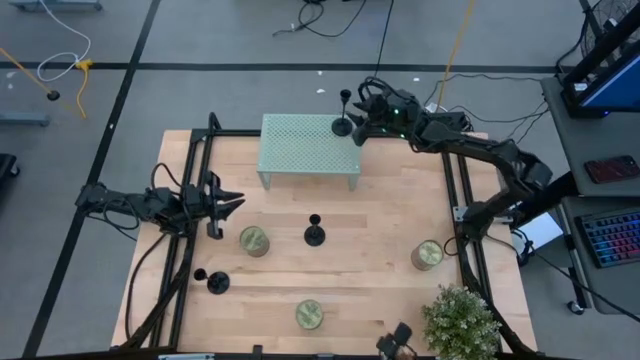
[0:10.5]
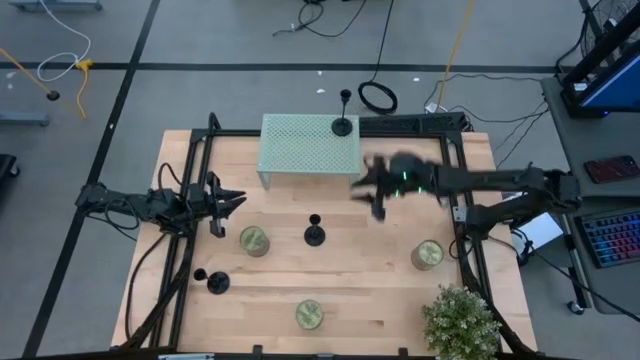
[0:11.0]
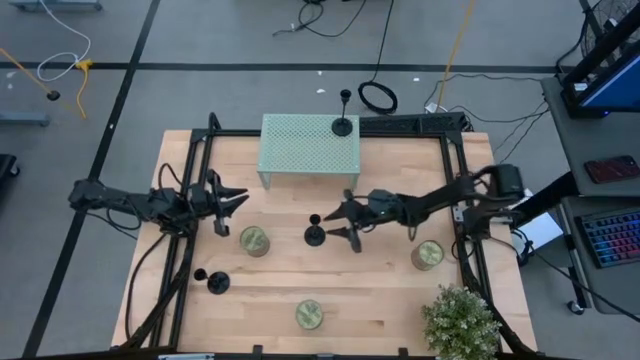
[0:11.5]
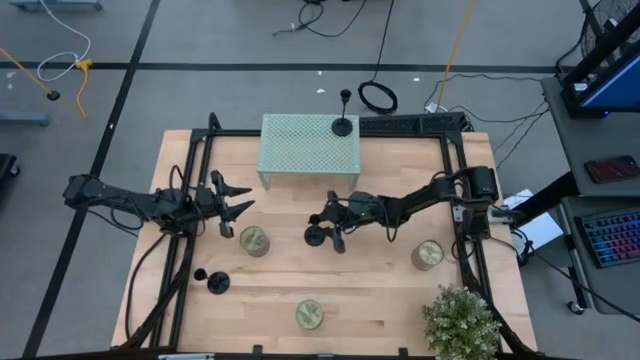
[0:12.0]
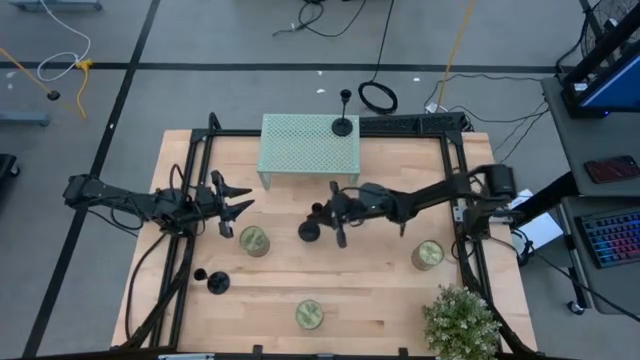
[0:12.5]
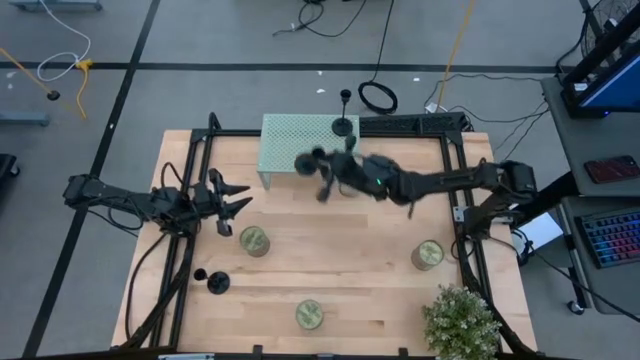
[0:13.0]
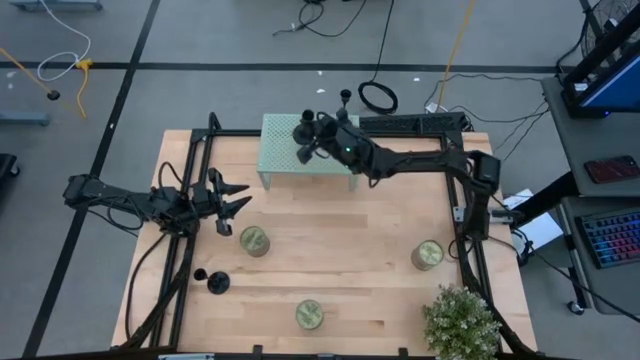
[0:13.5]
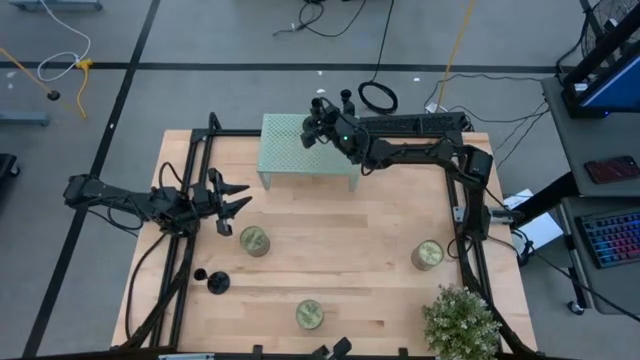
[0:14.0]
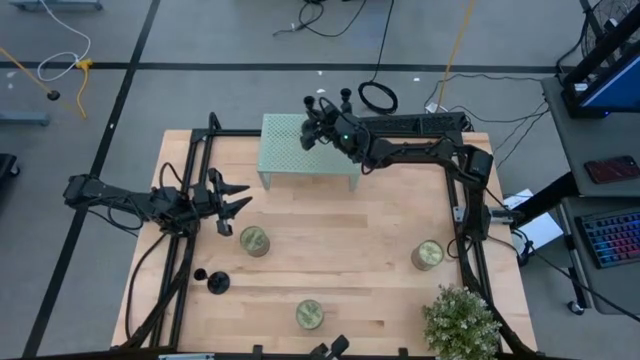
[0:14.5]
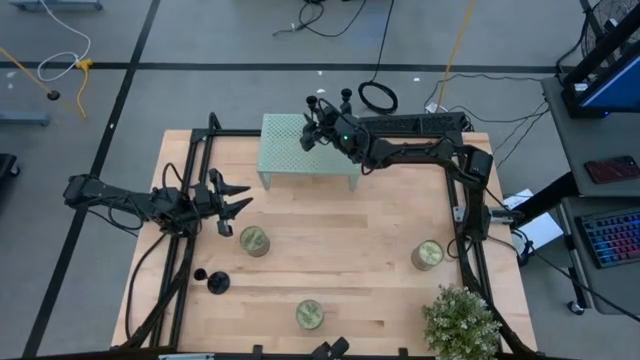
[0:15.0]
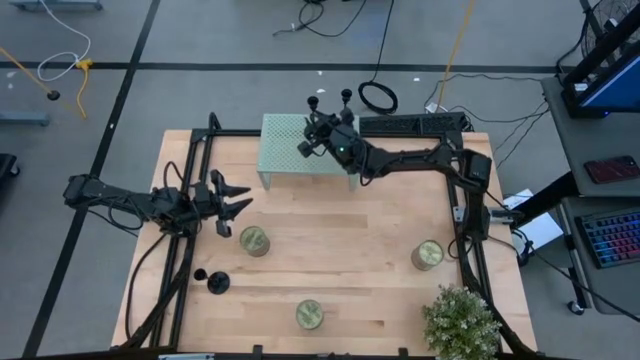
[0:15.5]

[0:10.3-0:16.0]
Task: Pick & Place candle stick holders
Put the black candle holder on the shelf

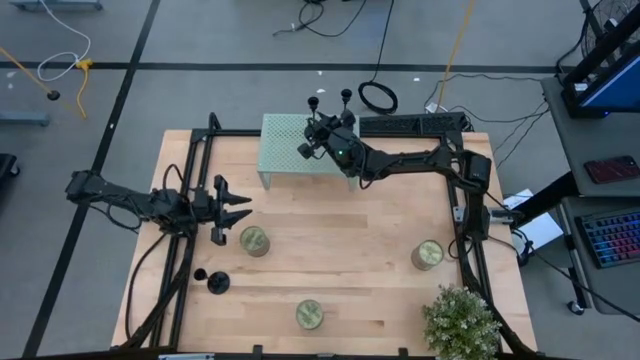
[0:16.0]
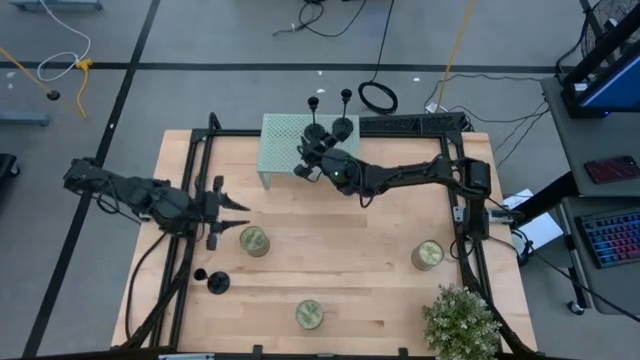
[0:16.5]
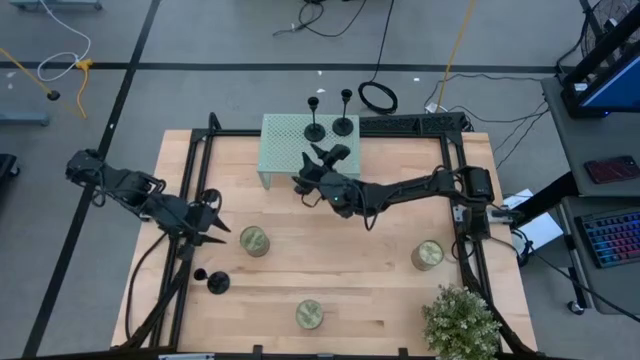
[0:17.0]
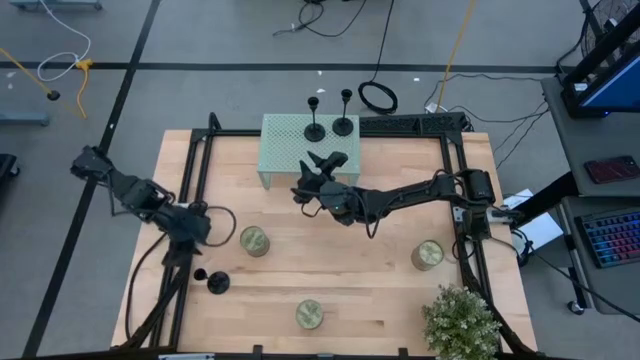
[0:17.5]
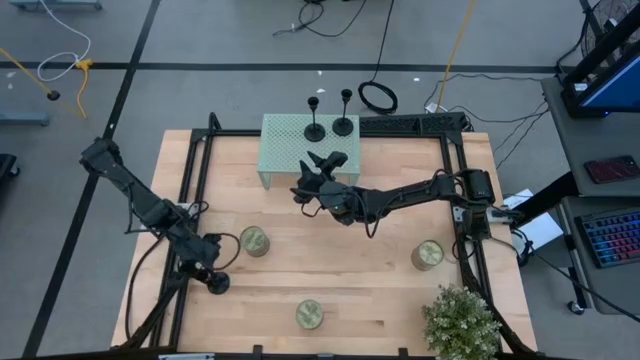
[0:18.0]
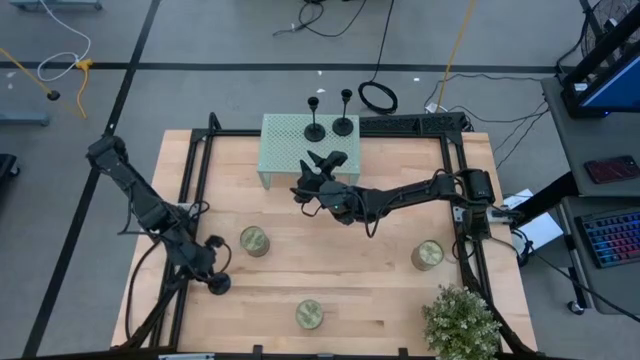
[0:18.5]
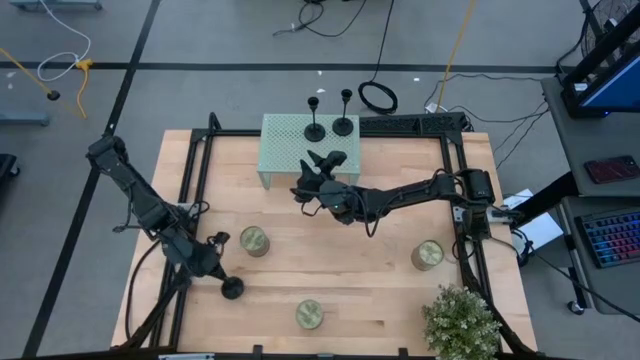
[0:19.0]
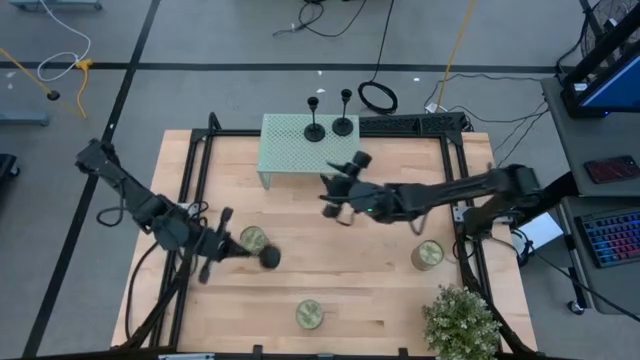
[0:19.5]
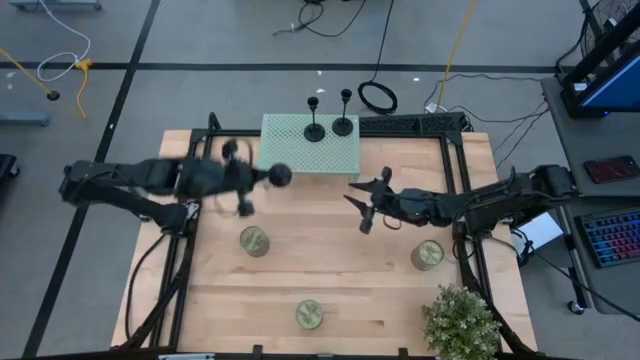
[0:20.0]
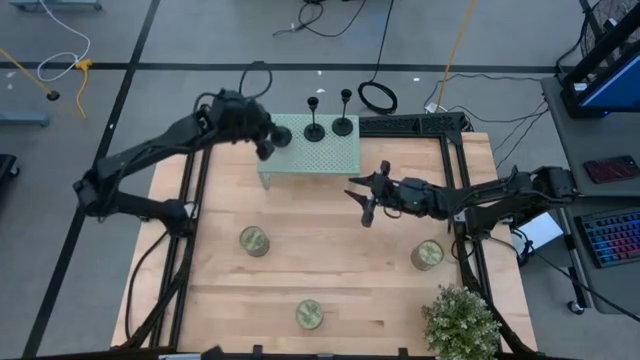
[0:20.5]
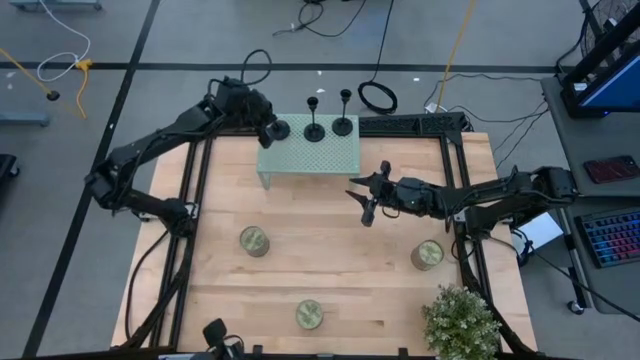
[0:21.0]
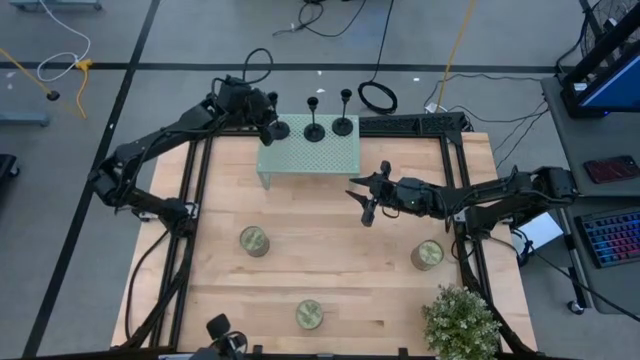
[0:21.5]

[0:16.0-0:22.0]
Put the black candle holder on the shelf

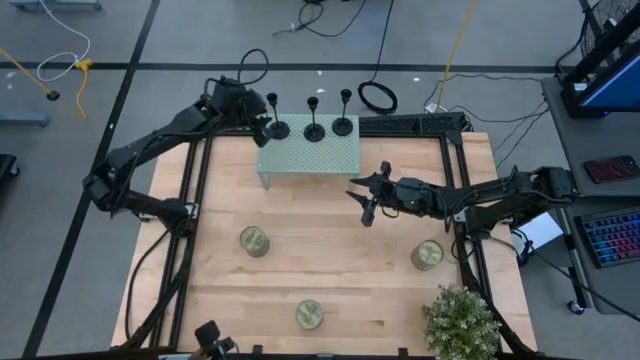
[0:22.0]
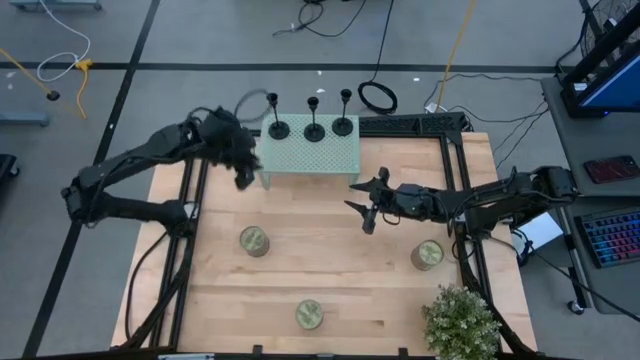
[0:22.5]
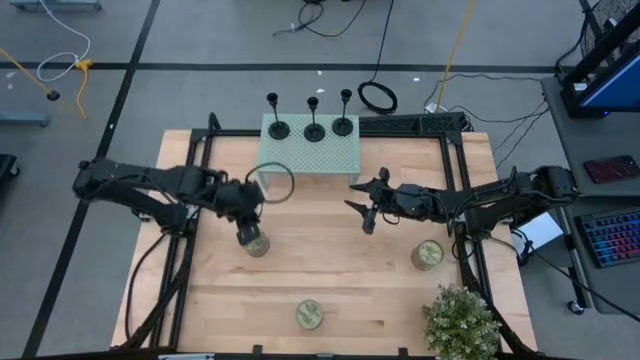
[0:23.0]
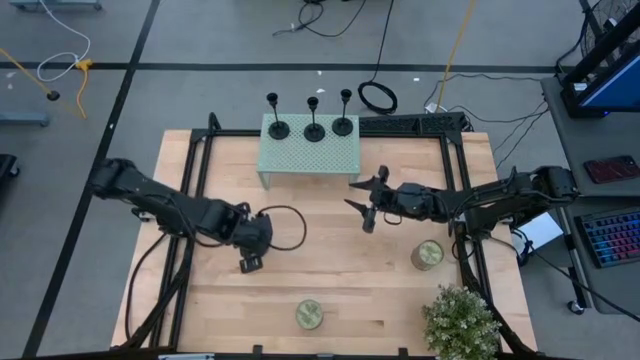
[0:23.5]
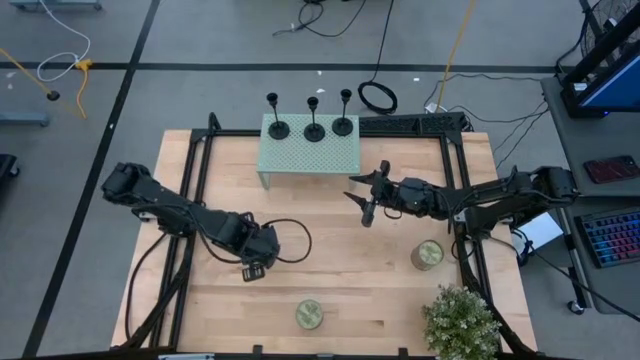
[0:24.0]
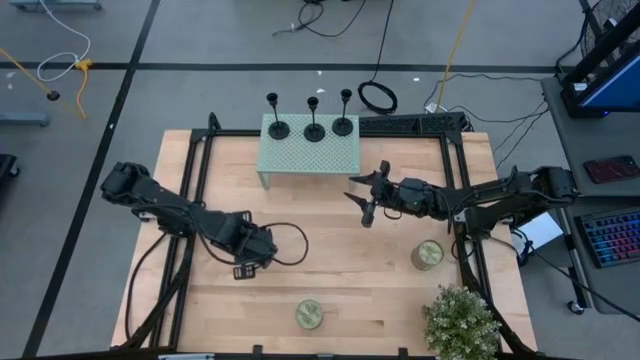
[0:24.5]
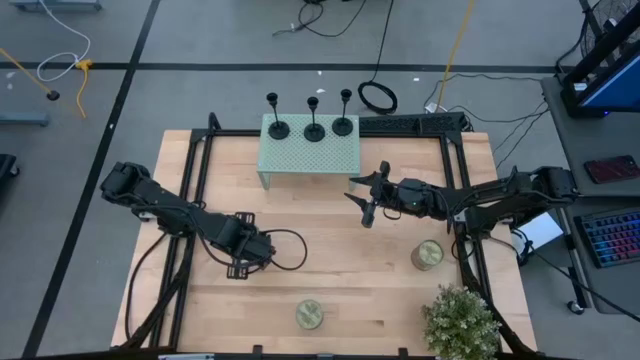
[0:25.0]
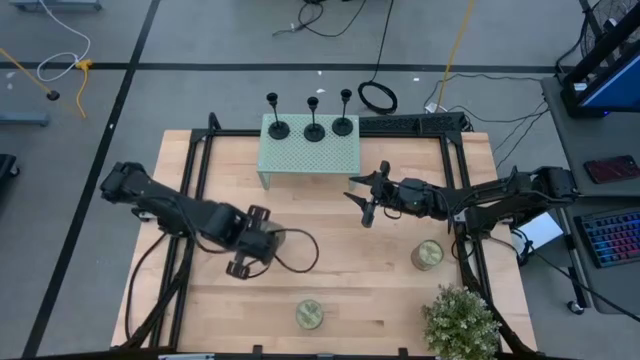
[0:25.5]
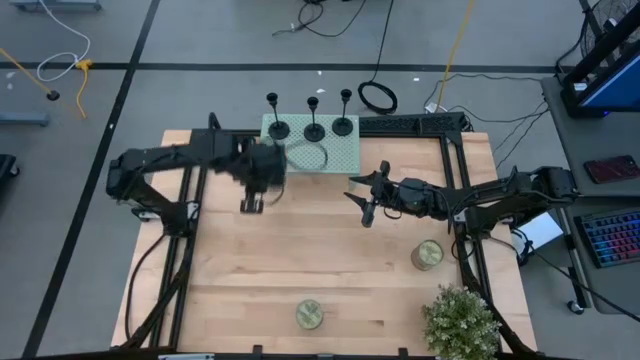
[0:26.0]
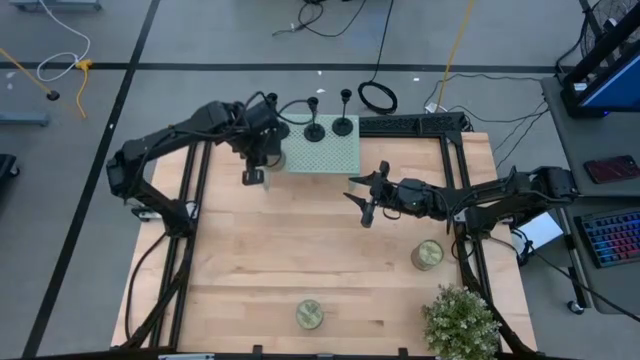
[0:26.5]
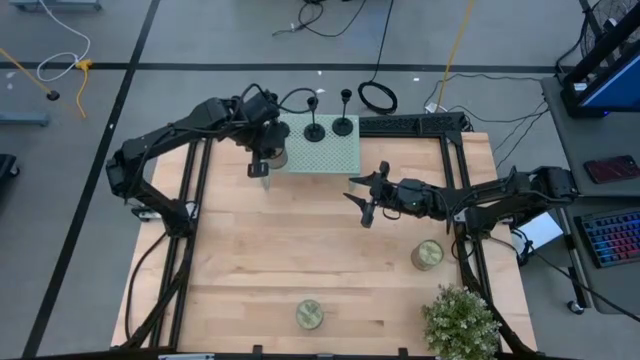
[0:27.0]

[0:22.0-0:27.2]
Put the scented candle on the shelf

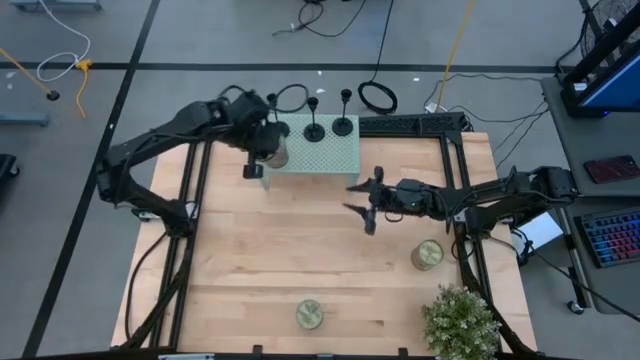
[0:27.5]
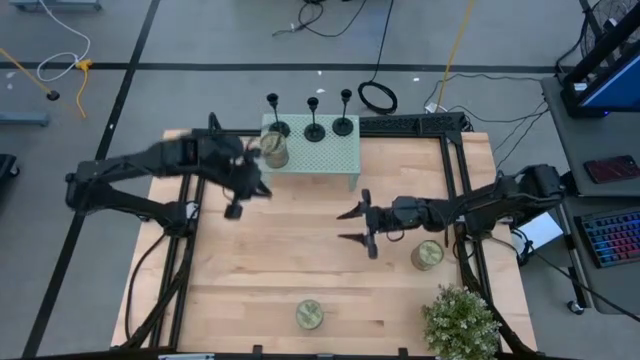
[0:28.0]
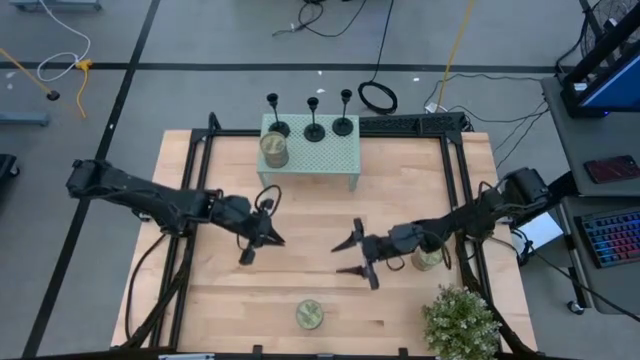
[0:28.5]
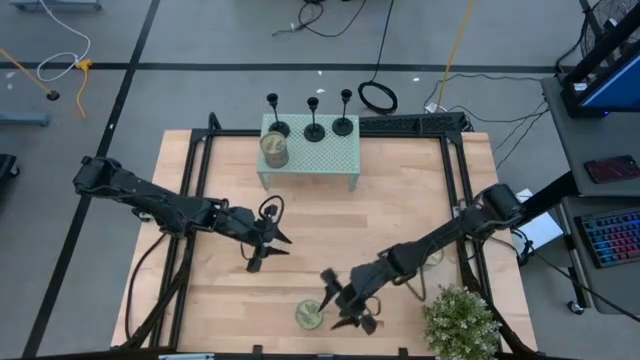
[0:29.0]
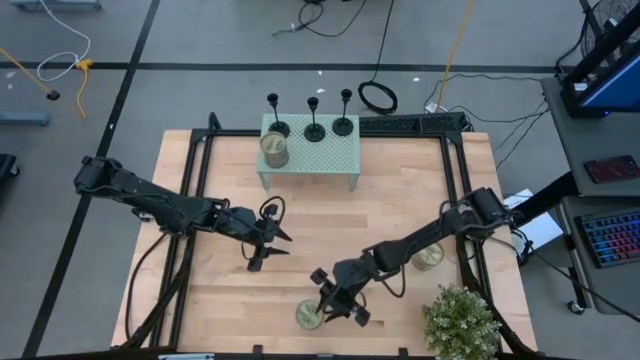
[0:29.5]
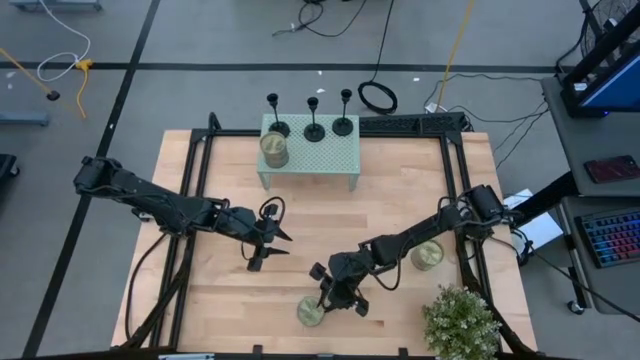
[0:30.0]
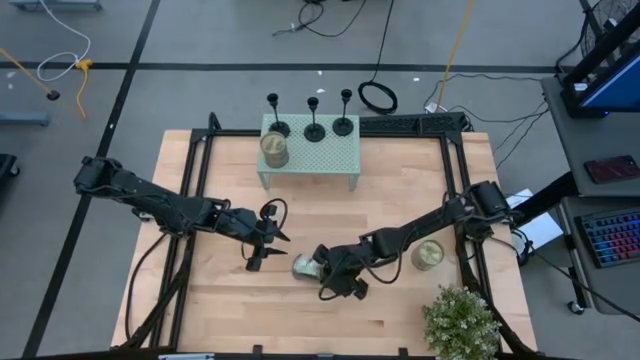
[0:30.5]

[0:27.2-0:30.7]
Put the scented candle on the shelf

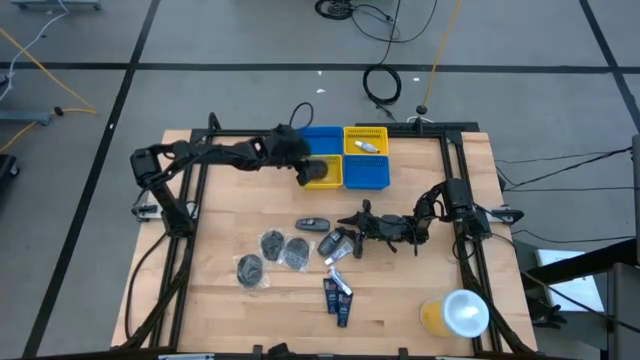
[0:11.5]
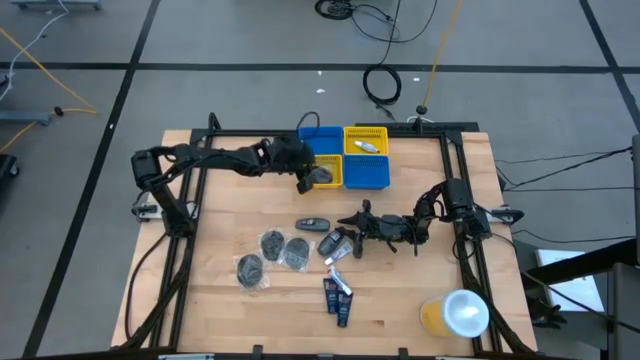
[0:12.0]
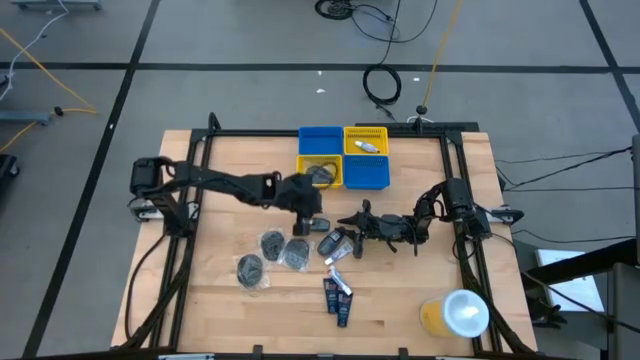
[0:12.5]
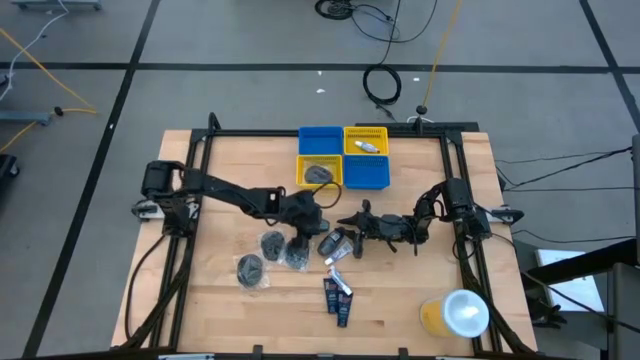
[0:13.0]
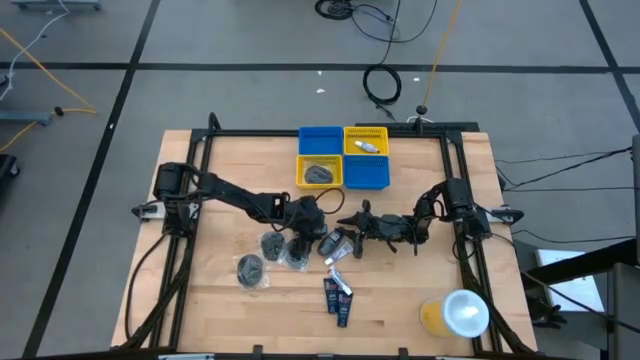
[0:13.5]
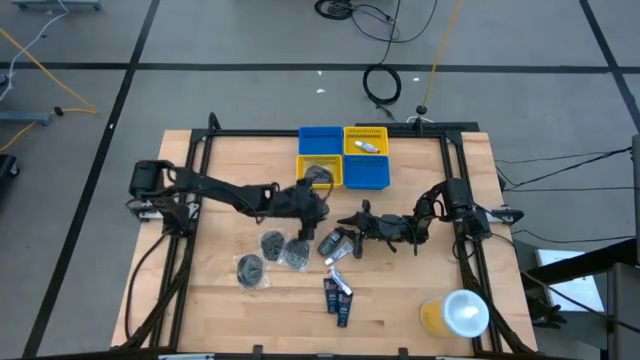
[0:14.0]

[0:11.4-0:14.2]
Task: Pick & Place Travel size toiletries
Put the gray deodorant into the left blue bin
